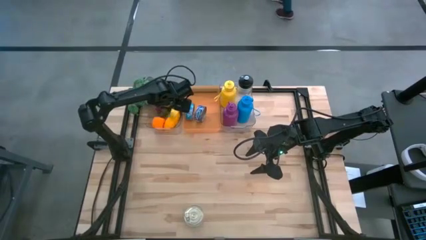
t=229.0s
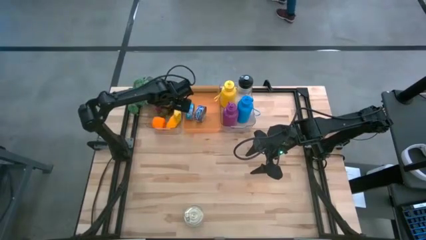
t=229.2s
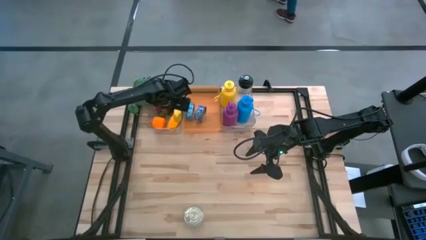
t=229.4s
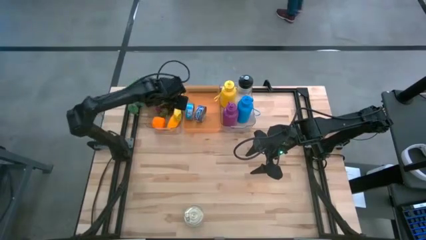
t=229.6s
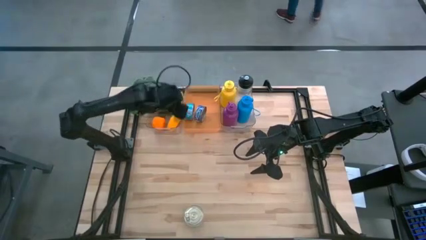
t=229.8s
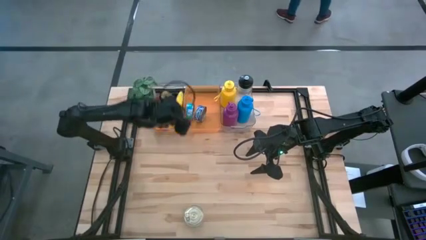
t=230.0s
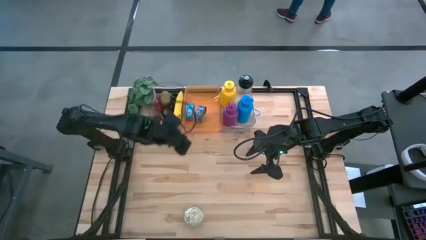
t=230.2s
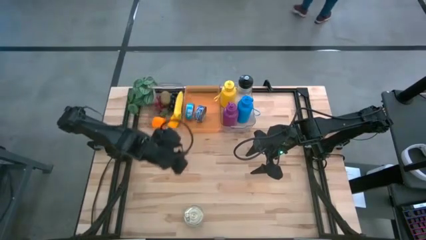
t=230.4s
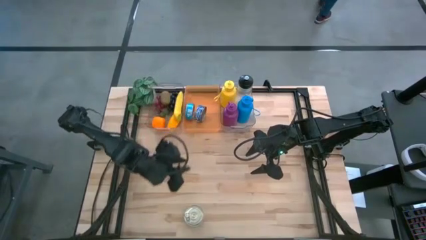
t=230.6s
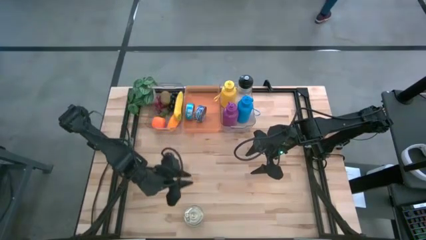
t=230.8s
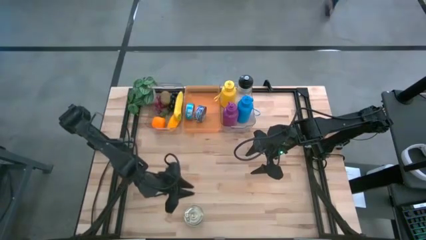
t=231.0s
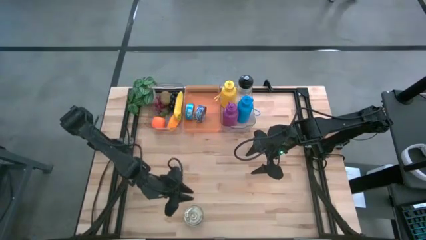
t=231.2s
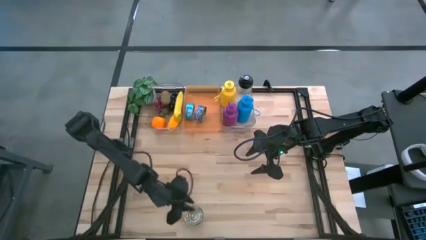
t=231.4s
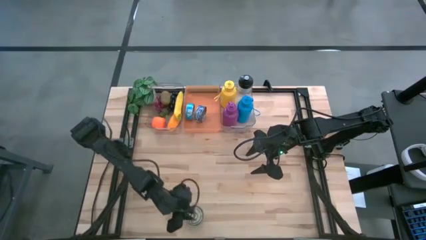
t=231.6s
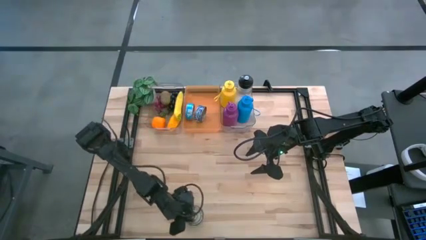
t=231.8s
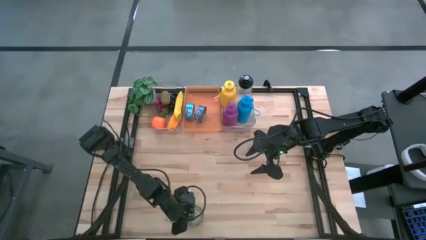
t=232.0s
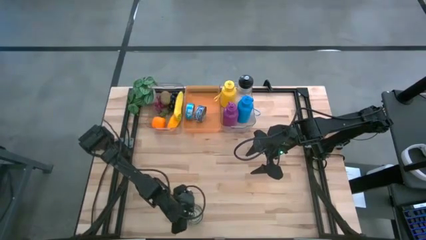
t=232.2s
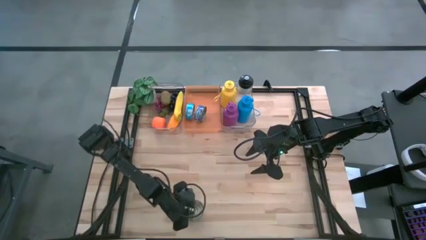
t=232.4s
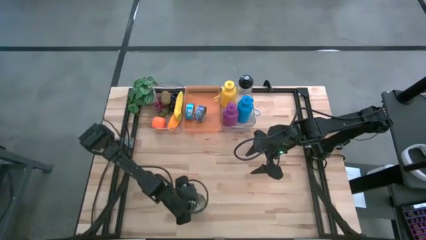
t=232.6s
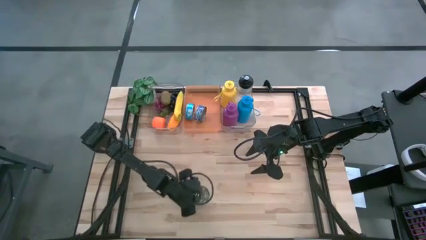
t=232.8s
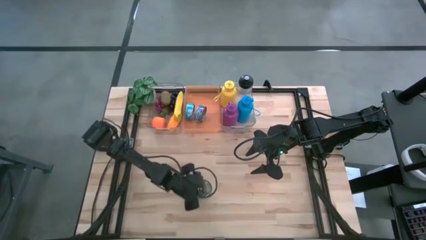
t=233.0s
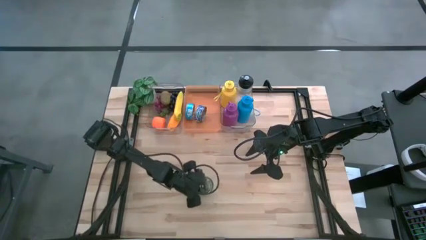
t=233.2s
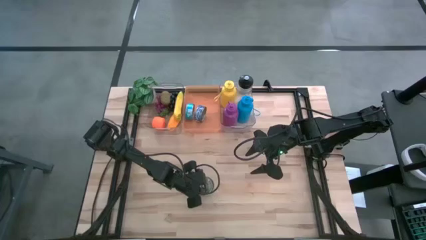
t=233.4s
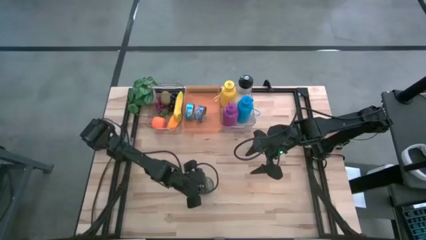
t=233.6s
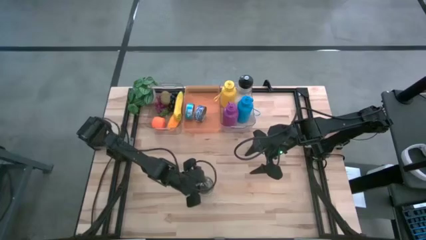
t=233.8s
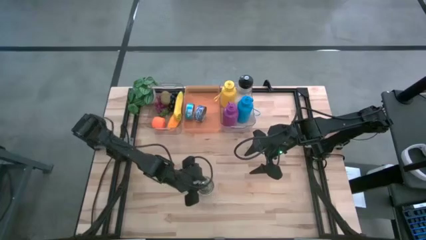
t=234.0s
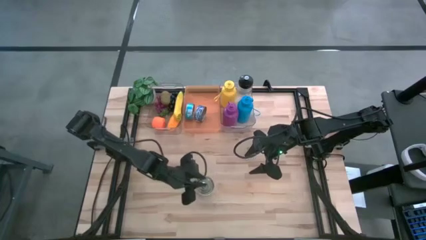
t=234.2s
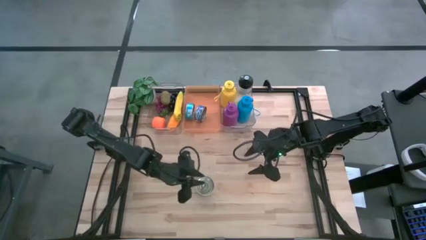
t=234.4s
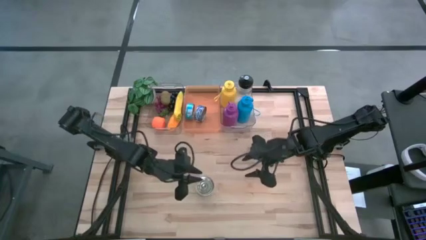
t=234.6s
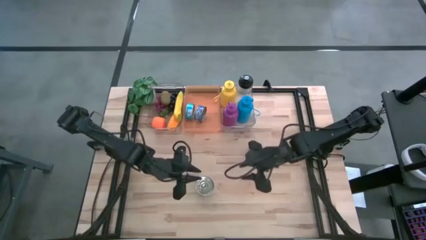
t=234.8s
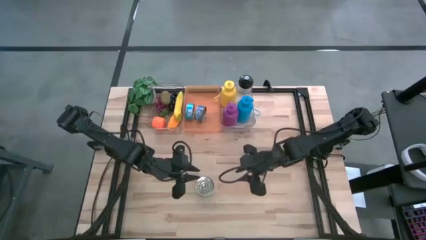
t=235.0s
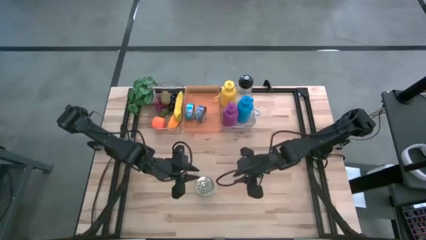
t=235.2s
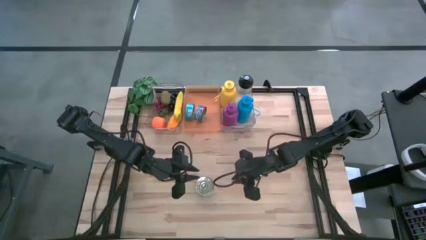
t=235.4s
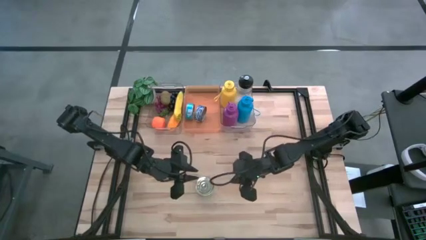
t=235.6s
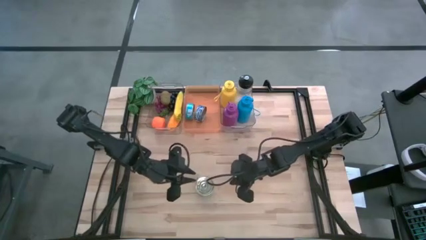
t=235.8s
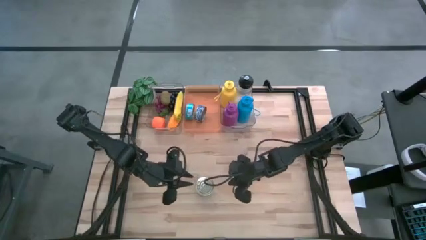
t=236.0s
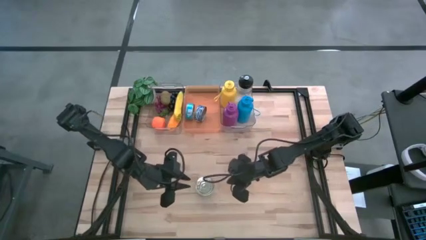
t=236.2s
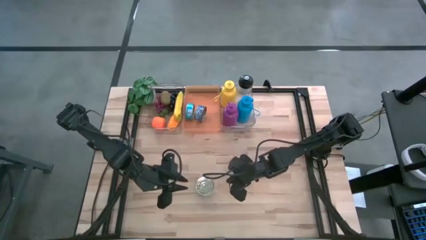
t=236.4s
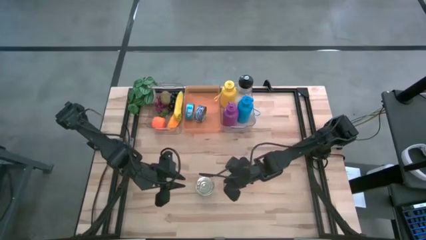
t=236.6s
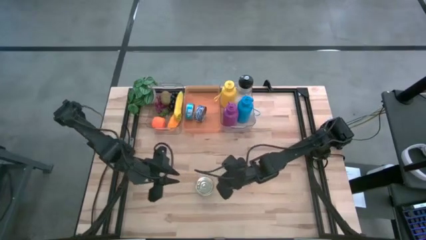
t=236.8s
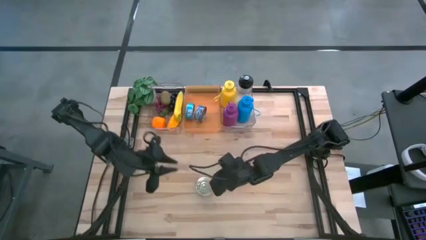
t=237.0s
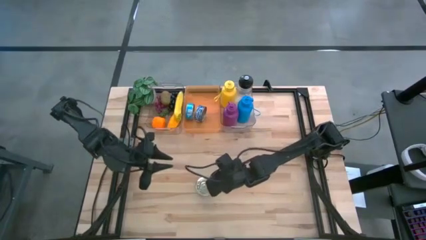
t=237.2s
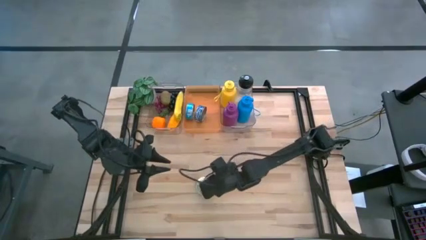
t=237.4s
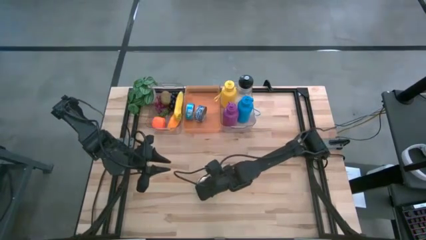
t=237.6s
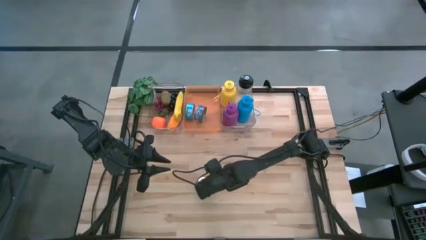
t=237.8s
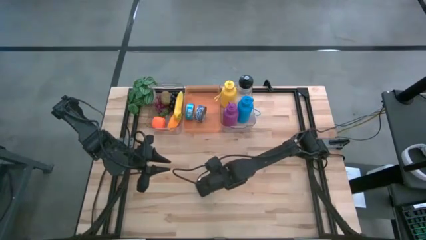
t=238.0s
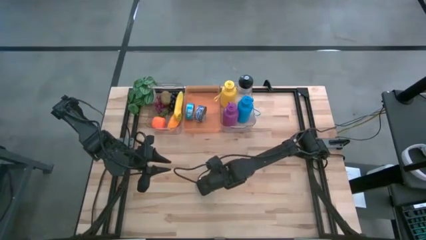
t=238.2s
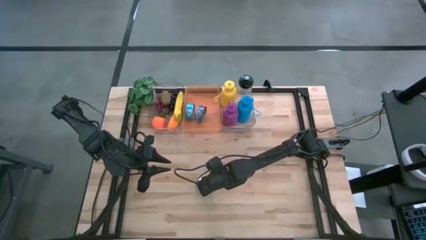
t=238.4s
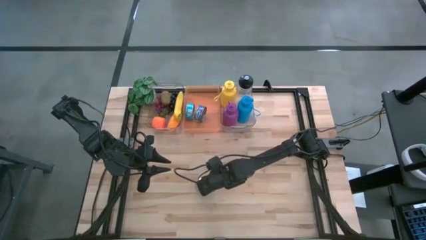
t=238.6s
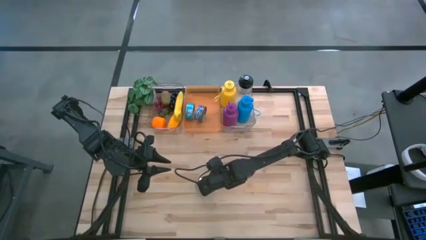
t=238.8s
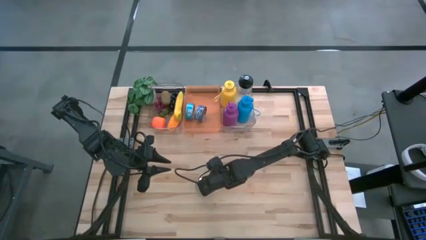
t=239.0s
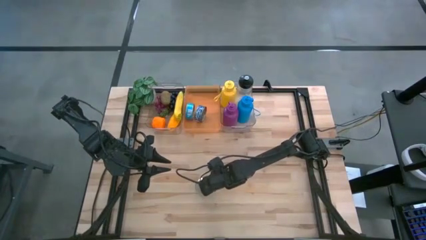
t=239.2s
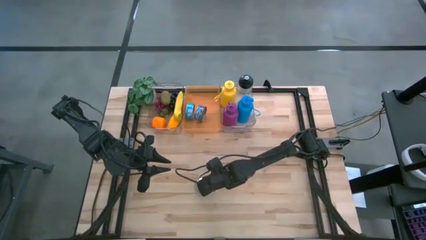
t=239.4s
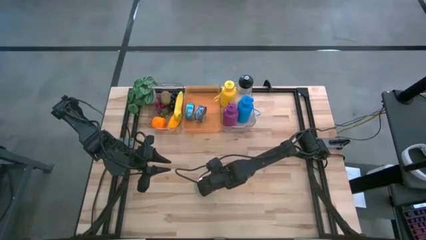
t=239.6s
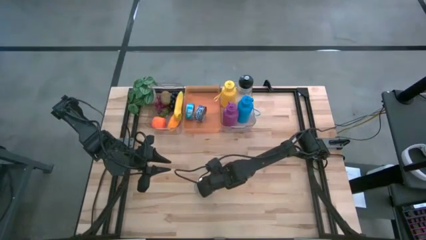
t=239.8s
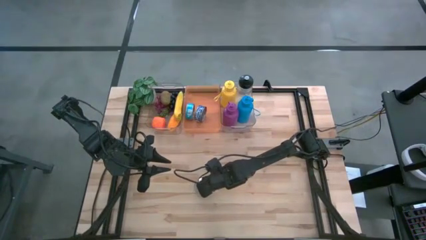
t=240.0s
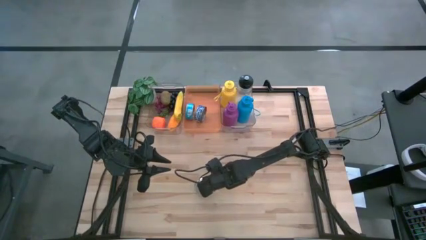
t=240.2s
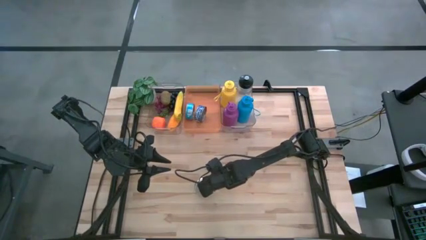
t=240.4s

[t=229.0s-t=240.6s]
Task: Pick & Place Food Item
Put the blue and pink tuna can into the orange bin

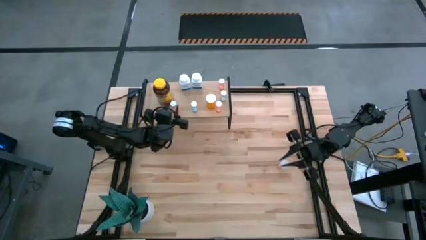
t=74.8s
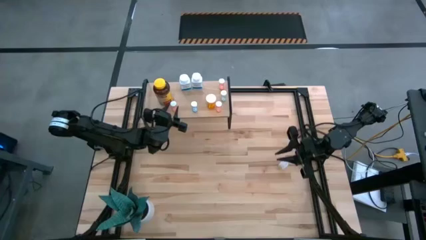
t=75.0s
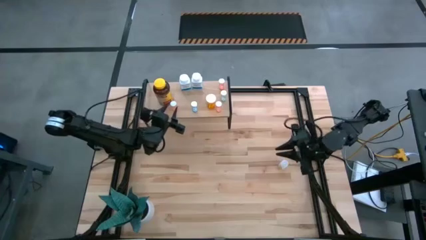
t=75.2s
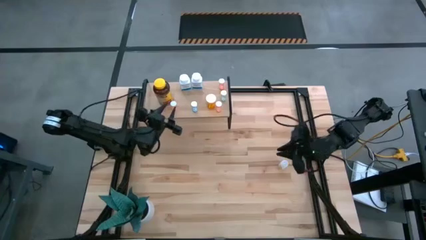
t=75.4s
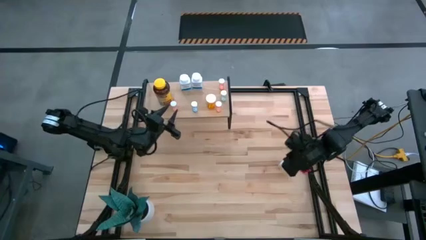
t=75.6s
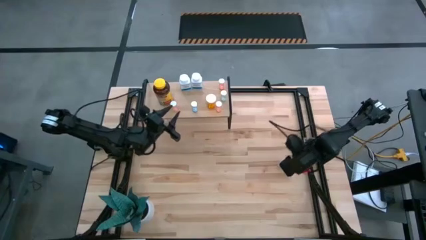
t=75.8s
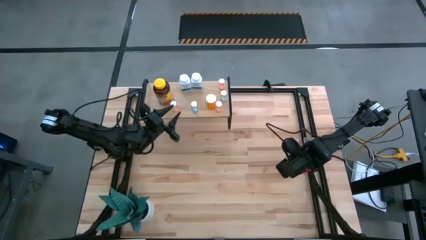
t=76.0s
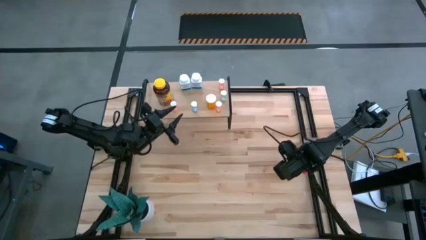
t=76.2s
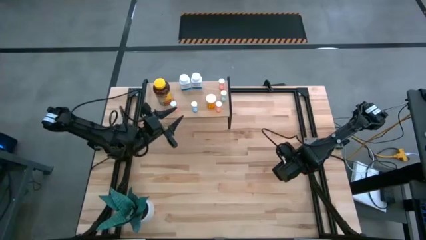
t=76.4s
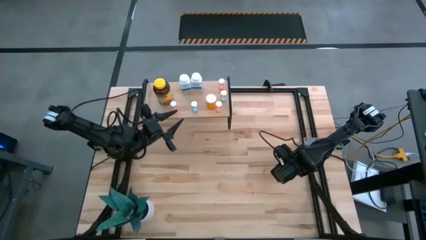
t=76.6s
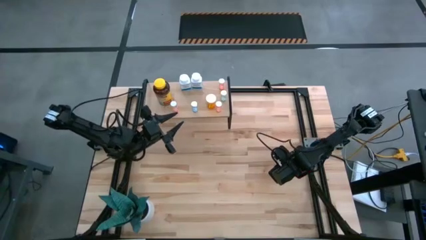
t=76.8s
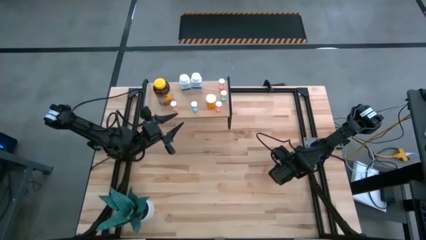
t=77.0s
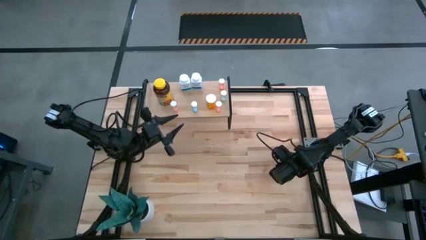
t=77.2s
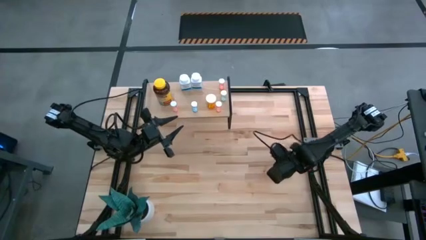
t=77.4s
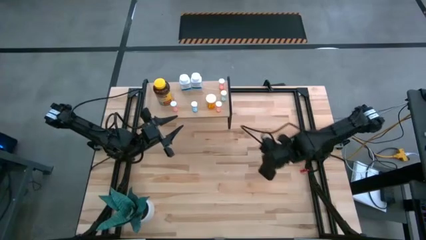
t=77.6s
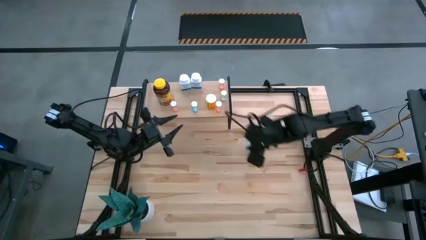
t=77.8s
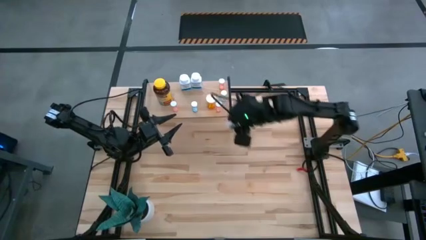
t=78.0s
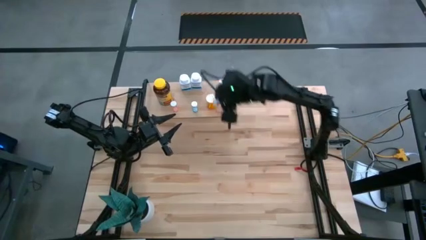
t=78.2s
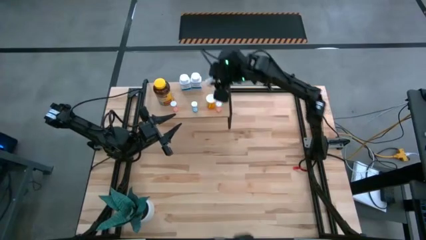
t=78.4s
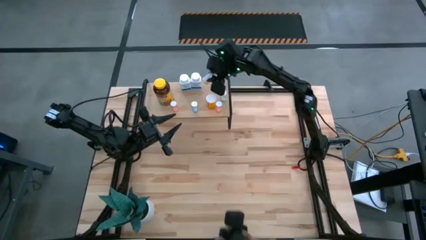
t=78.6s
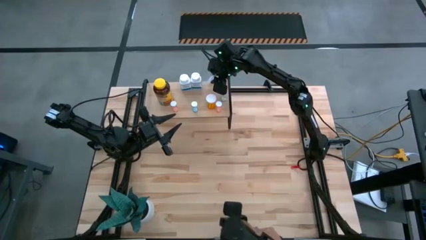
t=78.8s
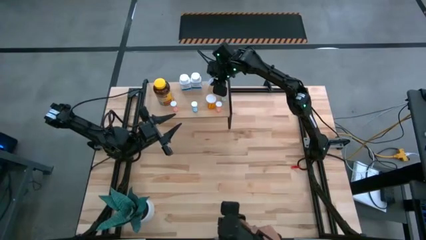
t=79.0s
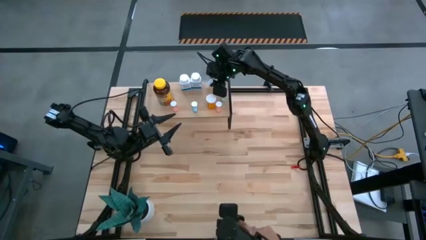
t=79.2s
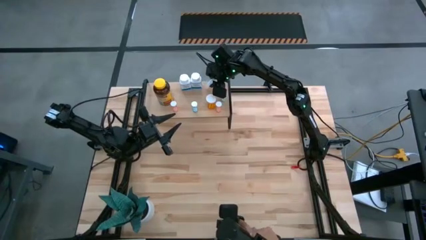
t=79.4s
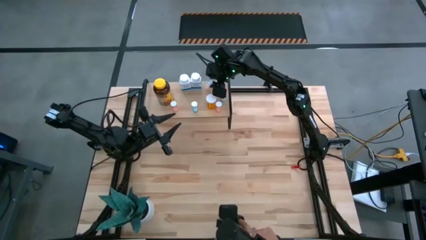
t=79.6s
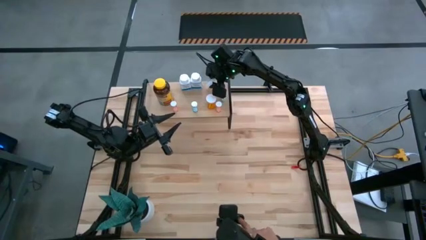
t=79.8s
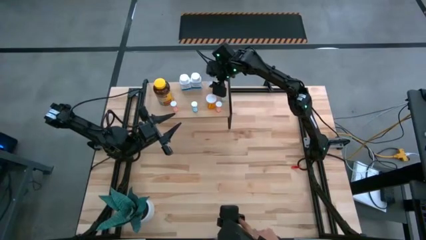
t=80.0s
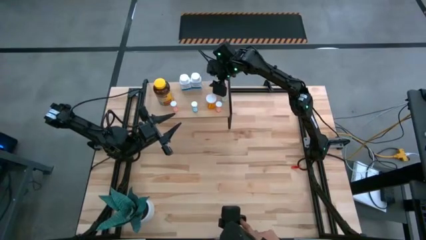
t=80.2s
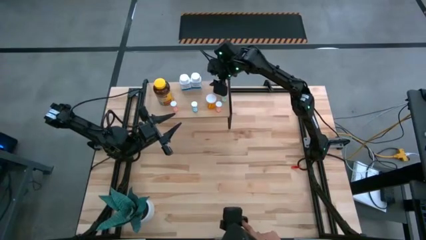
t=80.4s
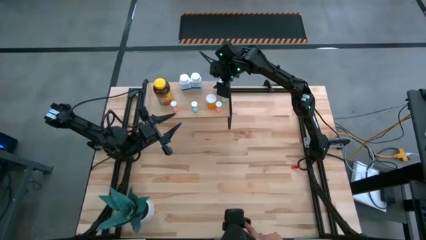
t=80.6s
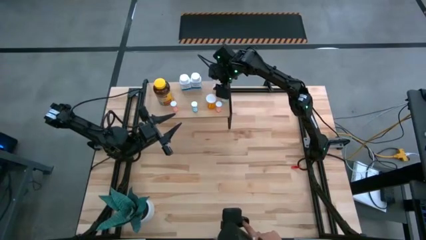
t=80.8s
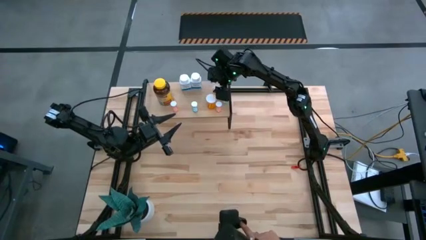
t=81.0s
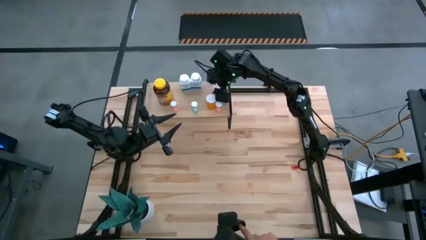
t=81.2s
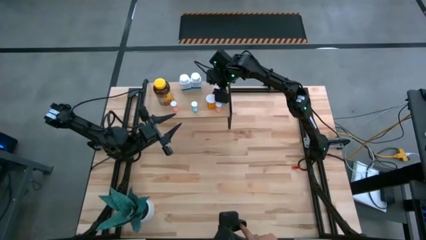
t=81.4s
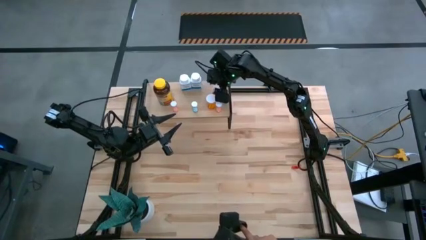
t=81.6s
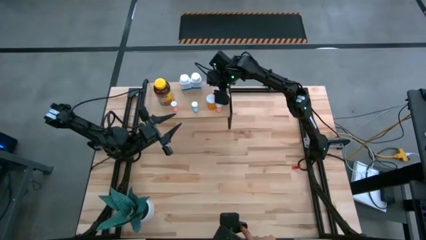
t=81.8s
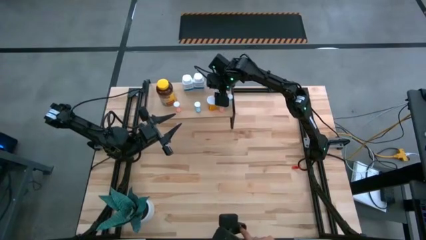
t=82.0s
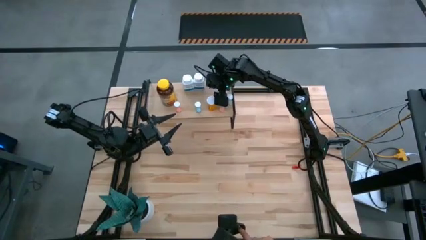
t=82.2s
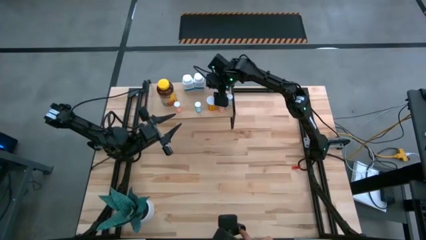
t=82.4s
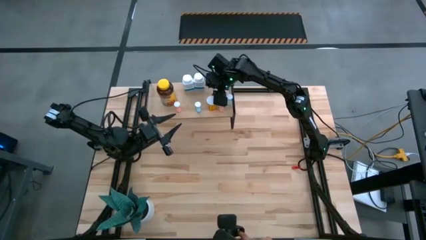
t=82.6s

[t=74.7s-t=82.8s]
Task: Pick and place medicine bottles onto shelf by color
Put the transparent pill bottle on the shelf
